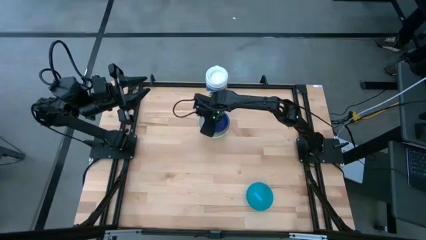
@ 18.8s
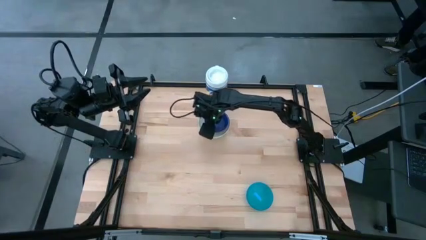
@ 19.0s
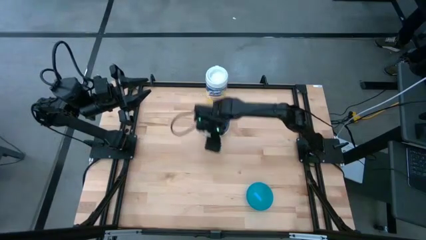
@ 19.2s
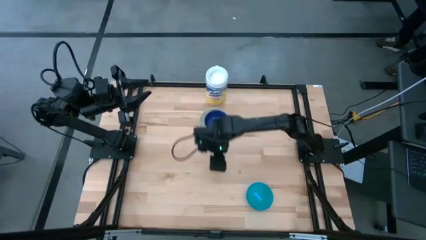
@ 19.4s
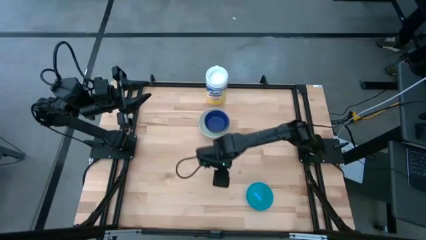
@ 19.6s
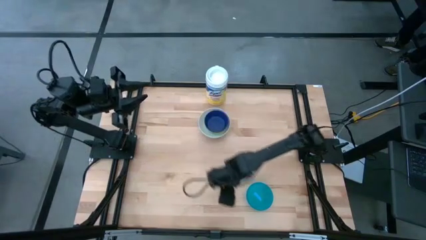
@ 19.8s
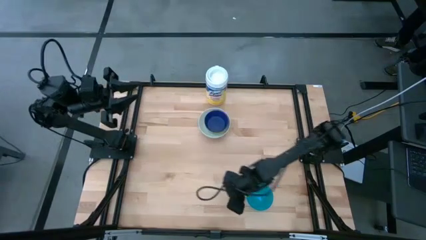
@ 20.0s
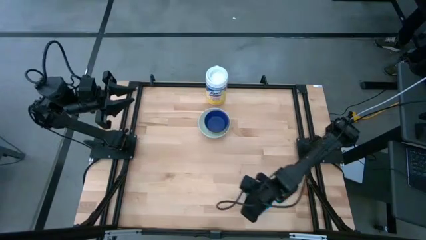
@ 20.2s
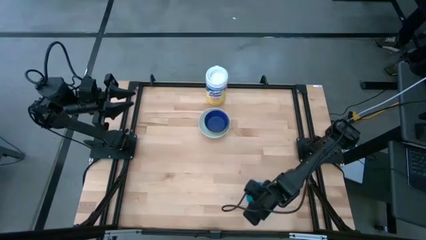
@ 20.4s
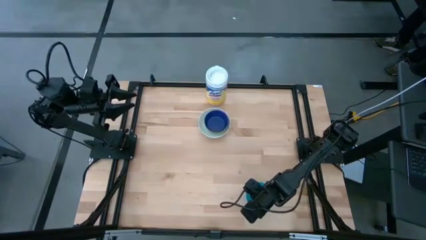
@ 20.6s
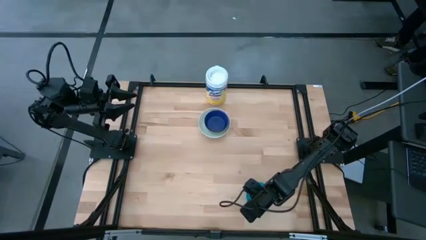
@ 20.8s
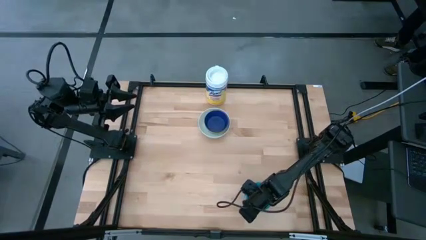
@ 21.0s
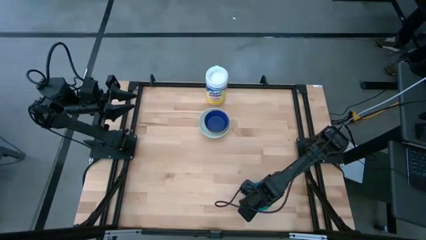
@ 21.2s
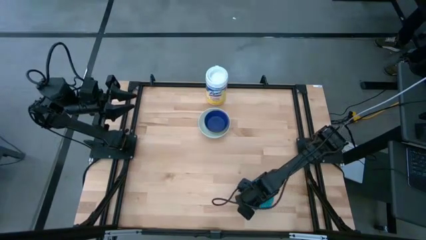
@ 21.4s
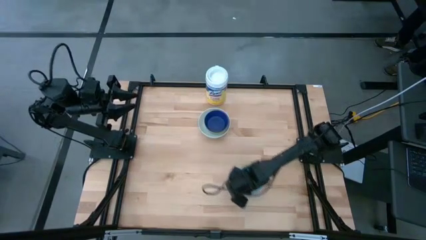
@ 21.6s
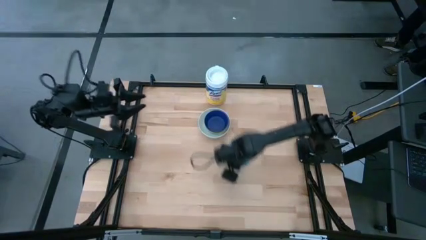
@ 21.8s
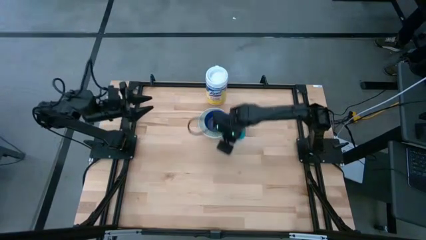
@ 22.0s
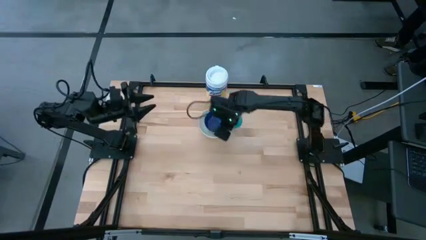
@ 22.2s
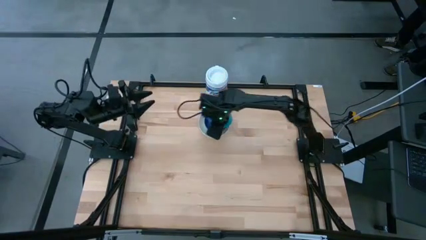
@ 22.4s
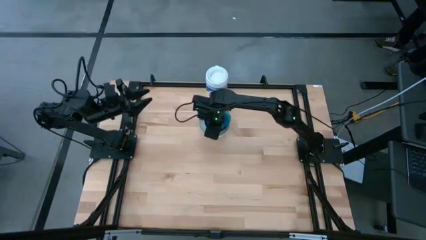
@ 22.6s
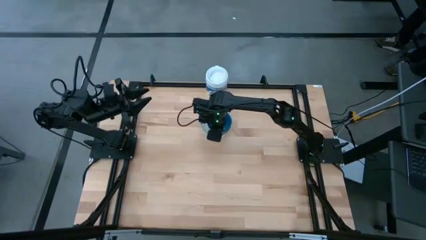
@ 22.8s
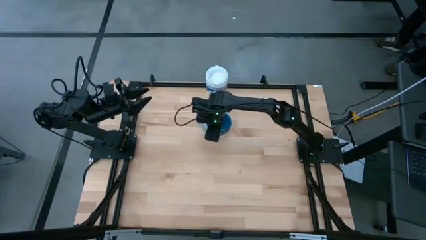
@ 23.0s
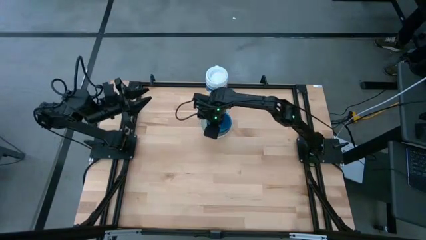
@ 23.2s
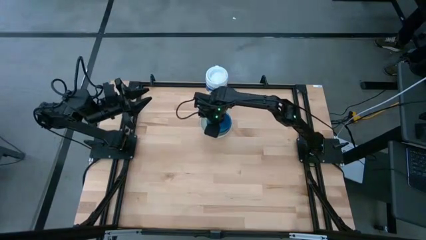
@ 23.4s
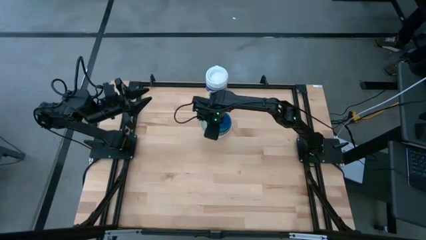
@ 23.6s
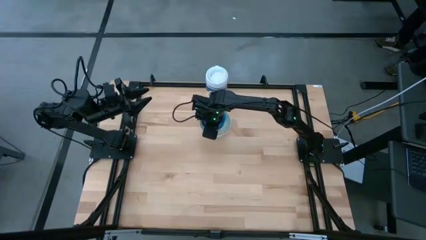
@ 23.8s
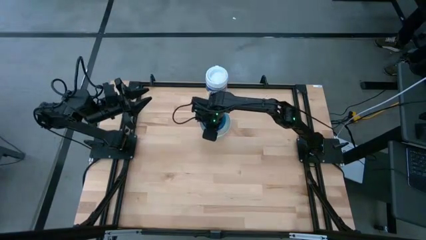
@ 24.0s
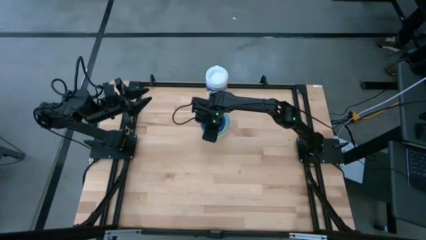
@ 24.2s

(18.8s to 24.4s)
Stack the light blue bowl on the blue bowl

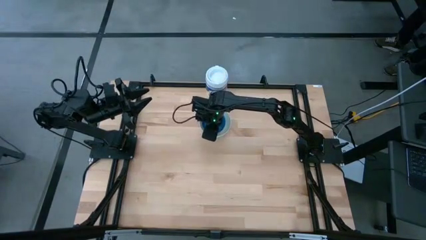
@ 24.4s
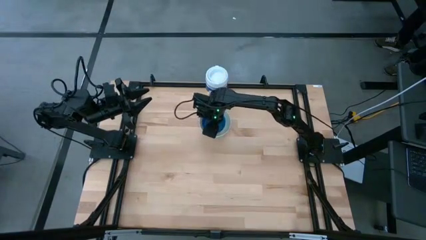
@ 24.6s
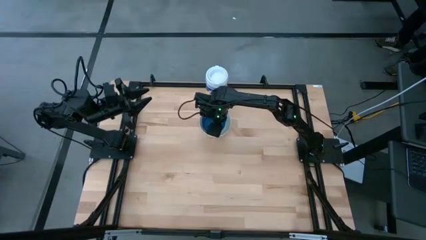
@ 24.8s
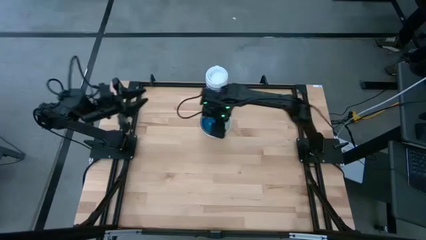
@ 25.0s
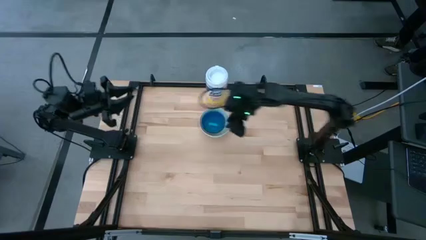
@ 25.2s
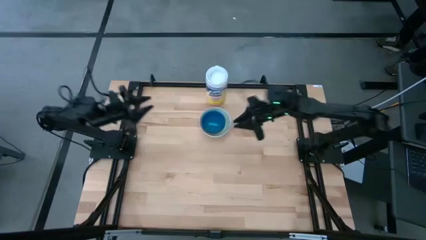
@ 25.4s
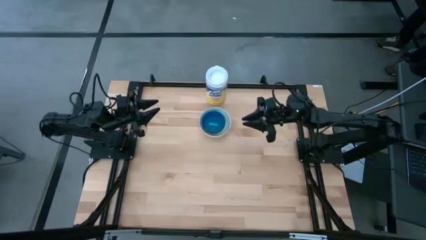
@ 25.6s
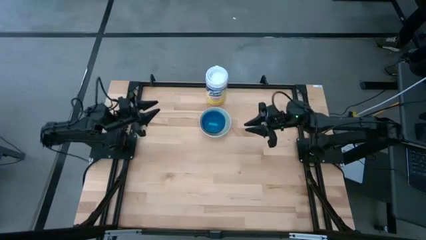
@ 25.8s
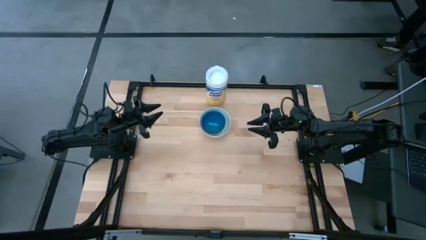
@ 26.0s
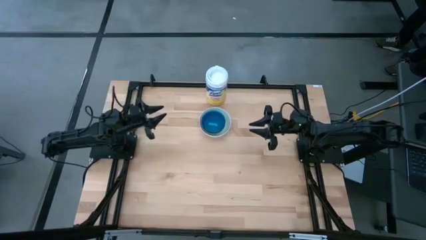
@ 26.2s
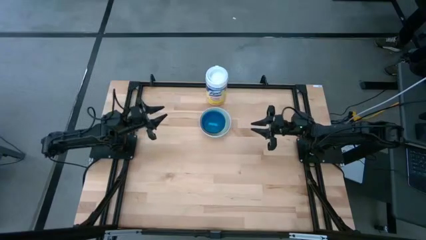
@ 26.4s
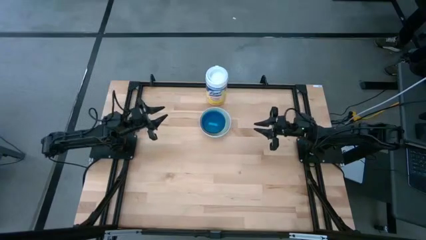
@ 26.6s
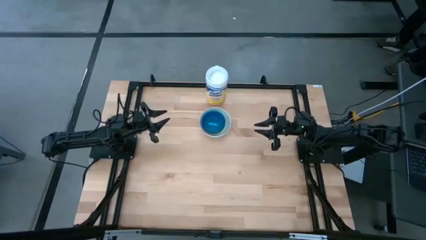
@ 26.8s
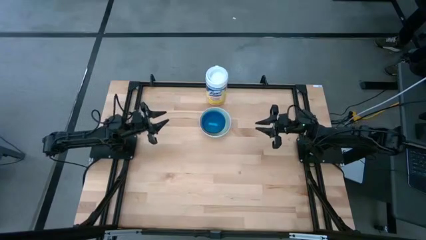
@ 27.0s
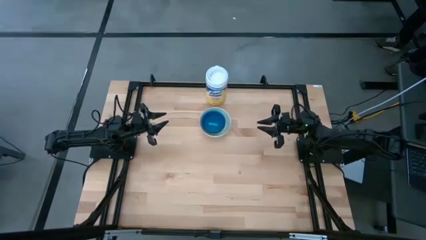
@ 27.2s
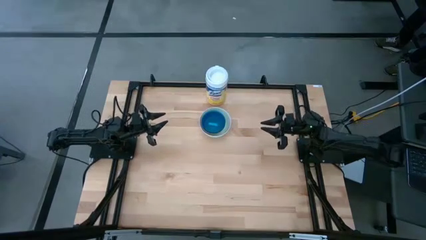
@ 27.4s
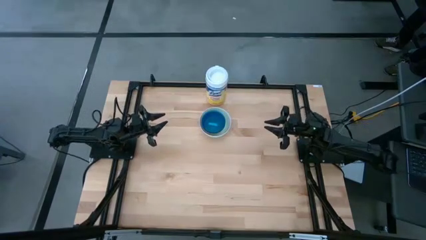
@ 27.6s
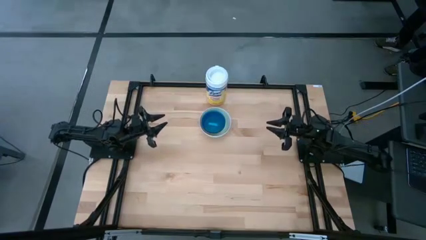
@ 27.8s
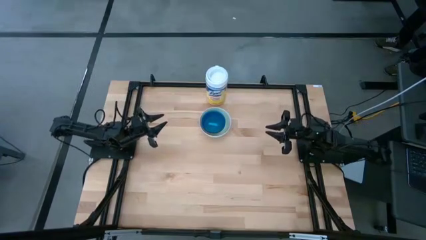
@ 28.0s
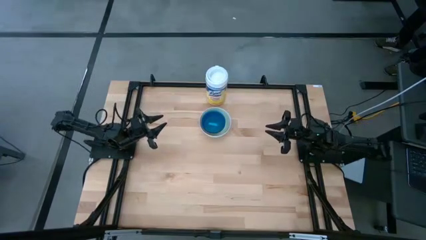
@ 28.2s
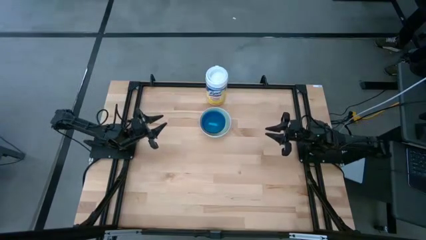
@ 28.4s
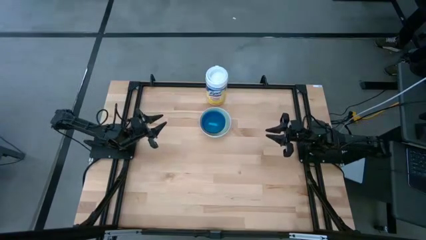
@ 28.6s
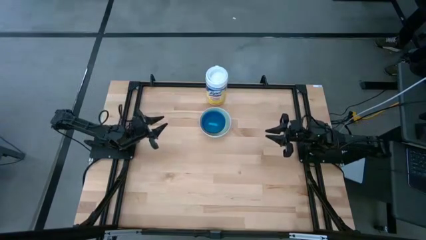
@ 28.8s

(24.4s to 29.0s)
Return to Home Position
